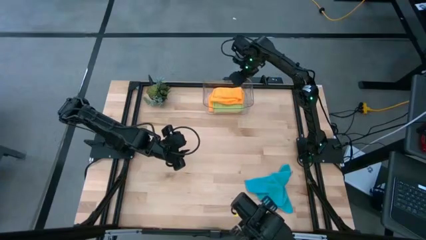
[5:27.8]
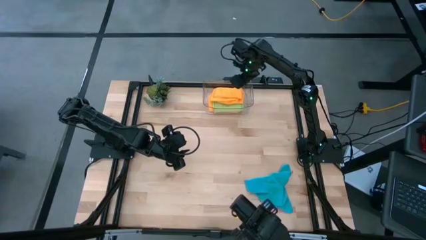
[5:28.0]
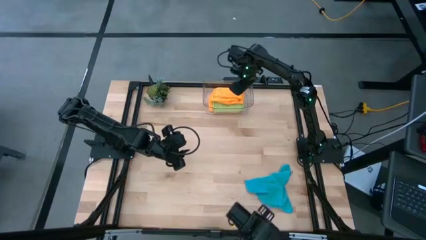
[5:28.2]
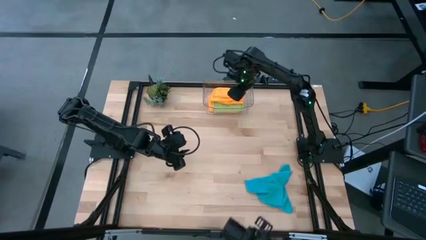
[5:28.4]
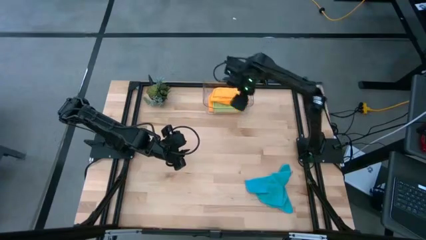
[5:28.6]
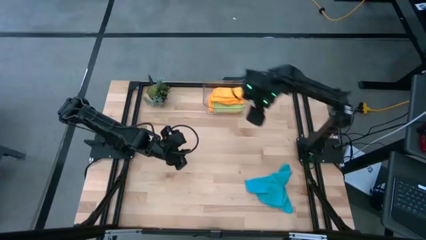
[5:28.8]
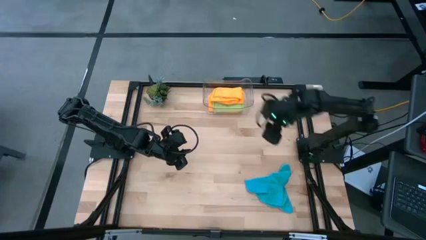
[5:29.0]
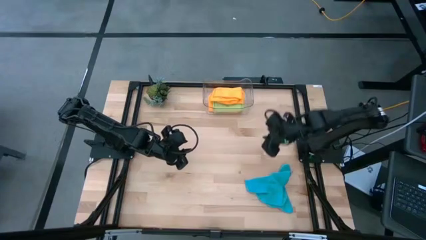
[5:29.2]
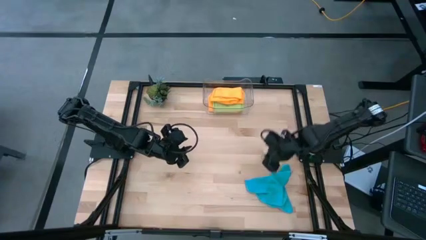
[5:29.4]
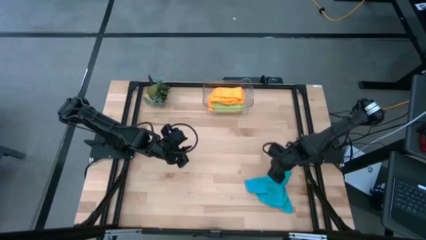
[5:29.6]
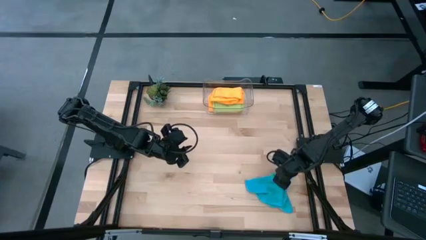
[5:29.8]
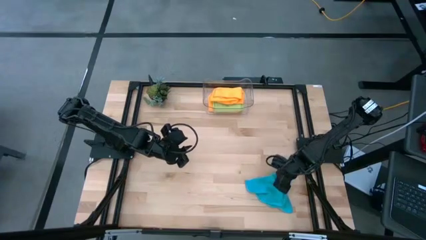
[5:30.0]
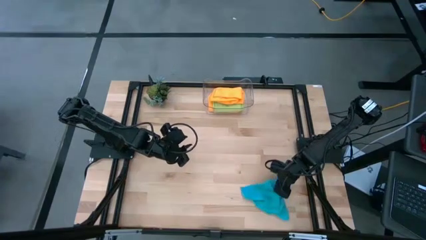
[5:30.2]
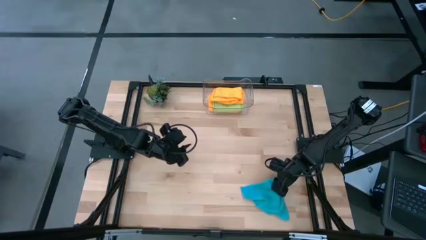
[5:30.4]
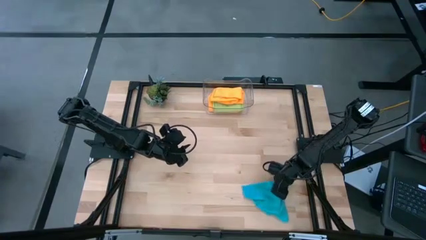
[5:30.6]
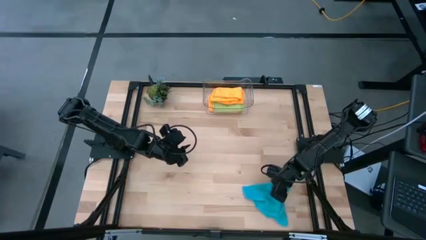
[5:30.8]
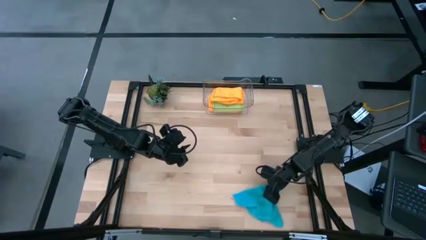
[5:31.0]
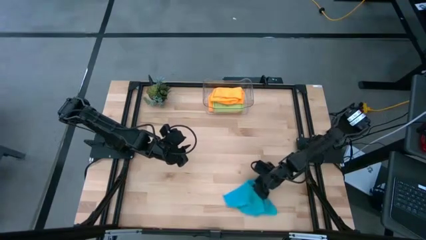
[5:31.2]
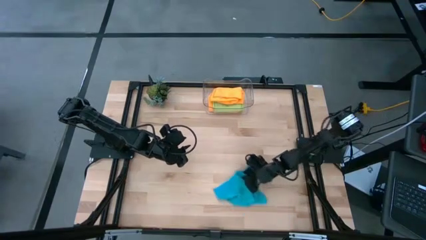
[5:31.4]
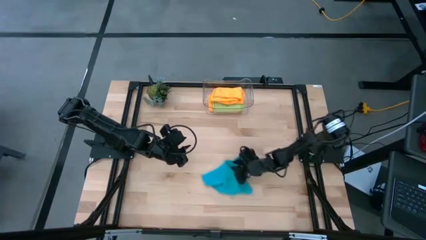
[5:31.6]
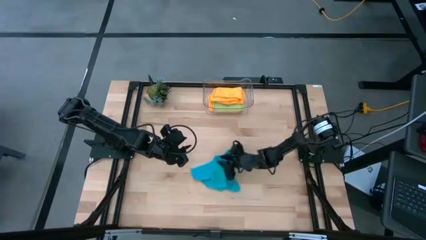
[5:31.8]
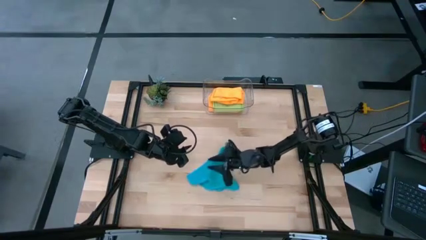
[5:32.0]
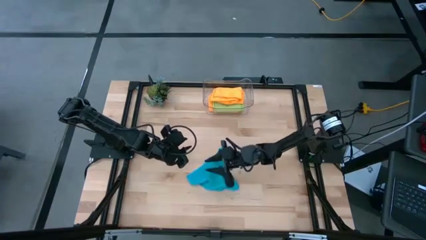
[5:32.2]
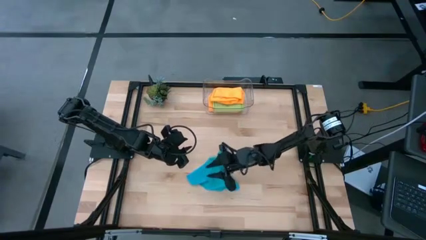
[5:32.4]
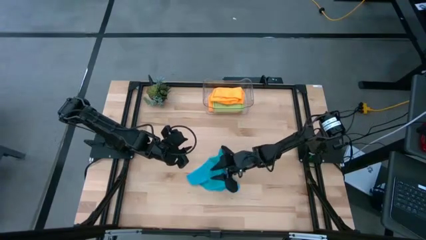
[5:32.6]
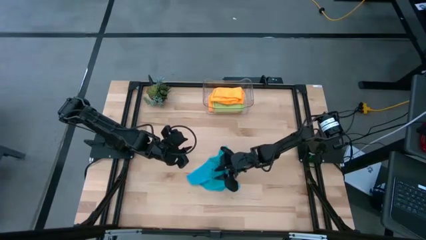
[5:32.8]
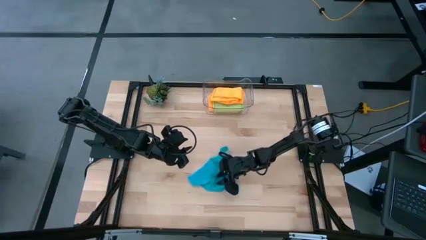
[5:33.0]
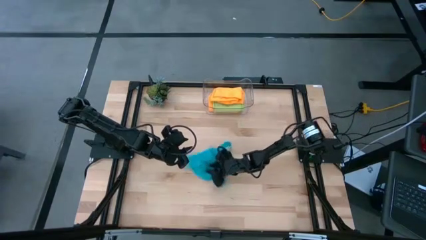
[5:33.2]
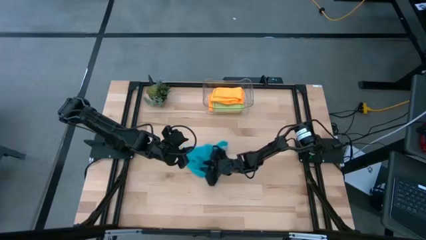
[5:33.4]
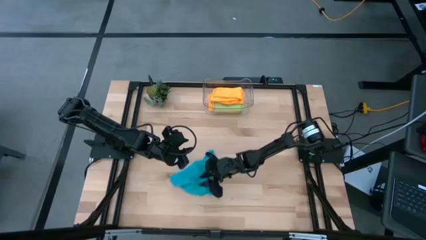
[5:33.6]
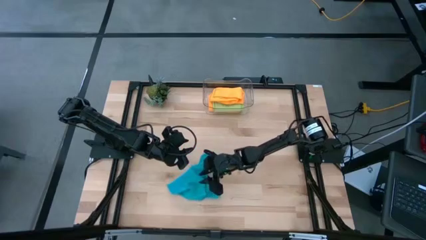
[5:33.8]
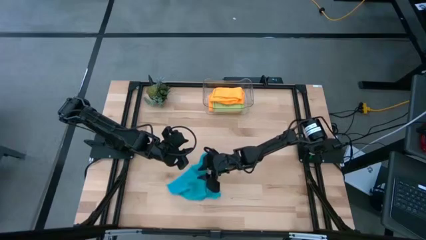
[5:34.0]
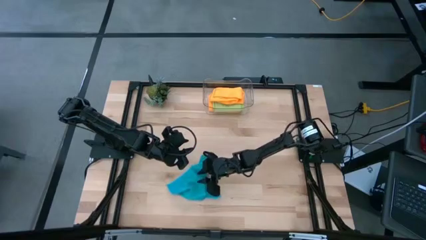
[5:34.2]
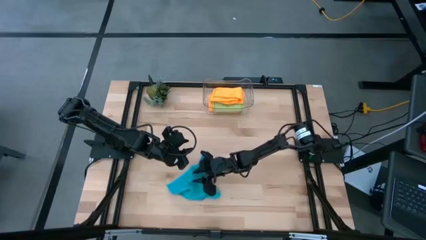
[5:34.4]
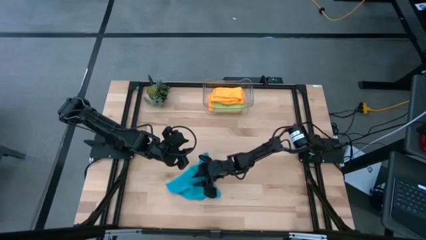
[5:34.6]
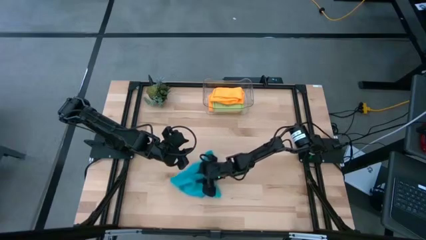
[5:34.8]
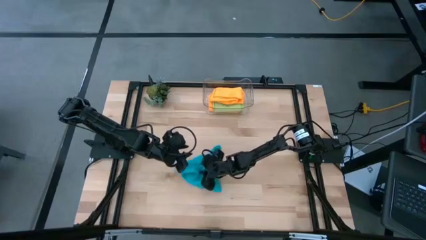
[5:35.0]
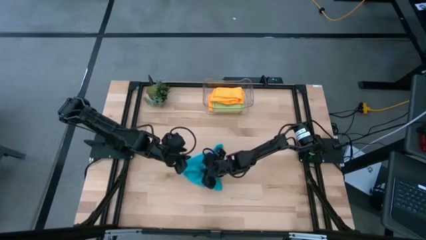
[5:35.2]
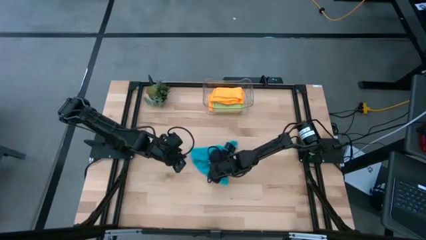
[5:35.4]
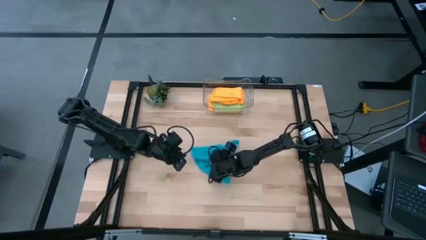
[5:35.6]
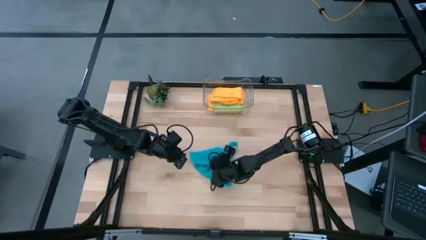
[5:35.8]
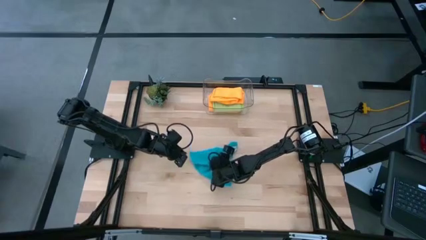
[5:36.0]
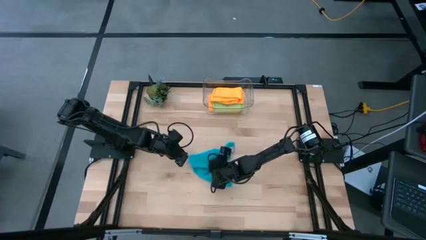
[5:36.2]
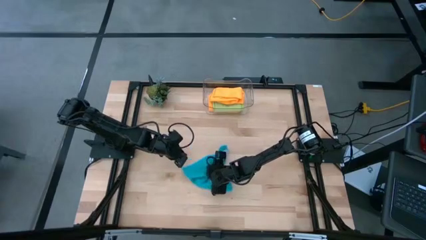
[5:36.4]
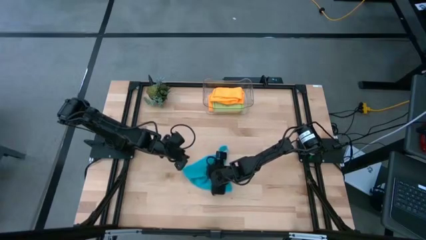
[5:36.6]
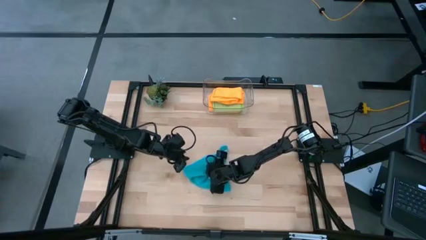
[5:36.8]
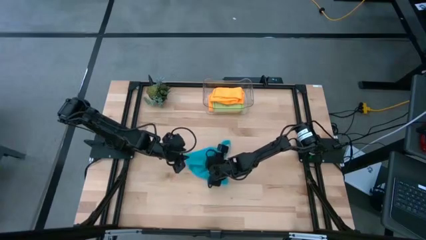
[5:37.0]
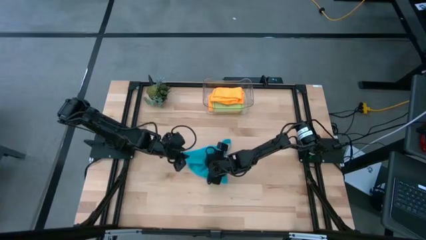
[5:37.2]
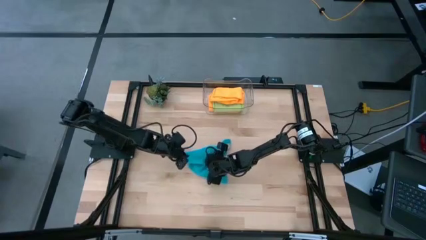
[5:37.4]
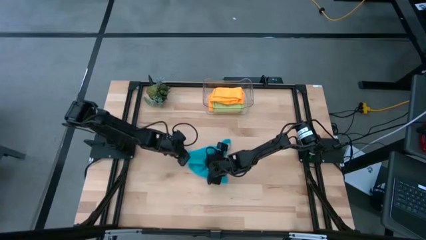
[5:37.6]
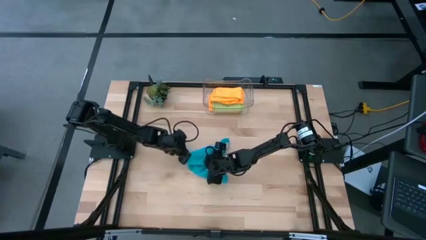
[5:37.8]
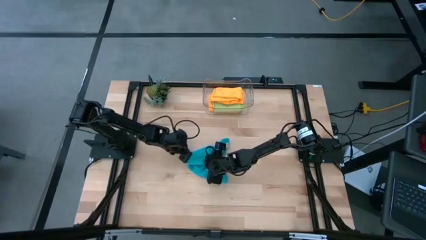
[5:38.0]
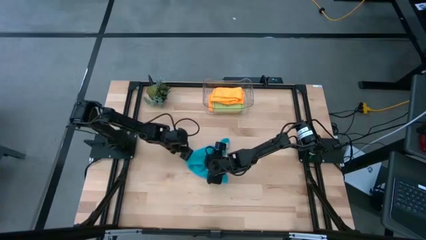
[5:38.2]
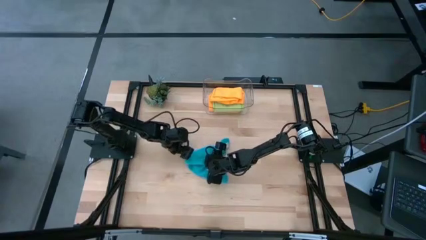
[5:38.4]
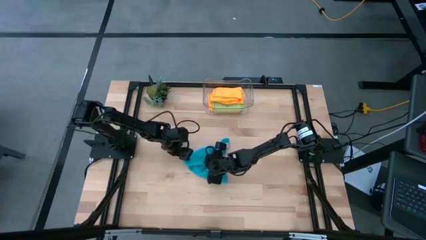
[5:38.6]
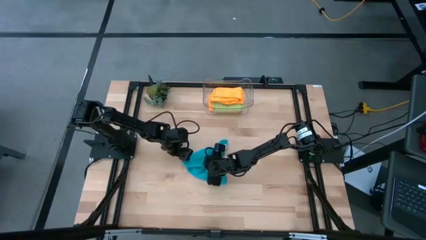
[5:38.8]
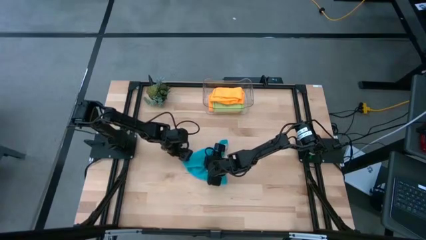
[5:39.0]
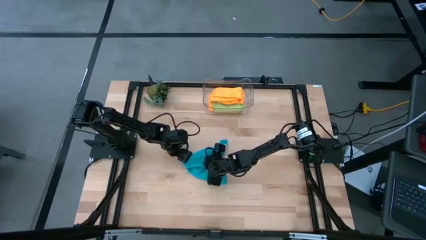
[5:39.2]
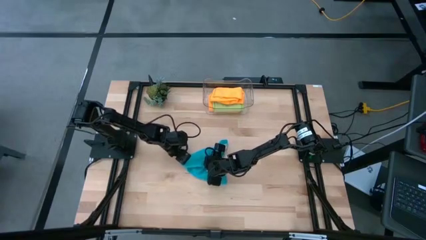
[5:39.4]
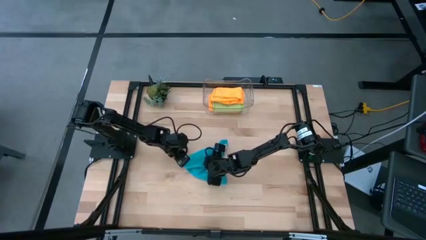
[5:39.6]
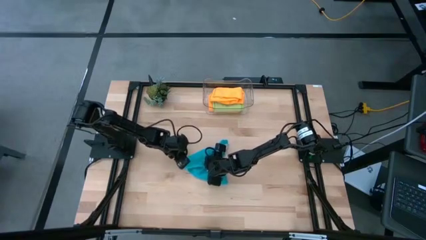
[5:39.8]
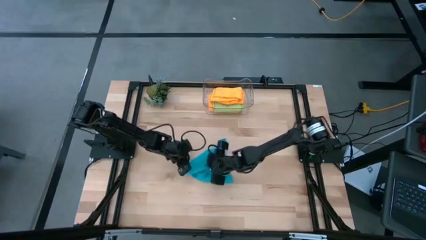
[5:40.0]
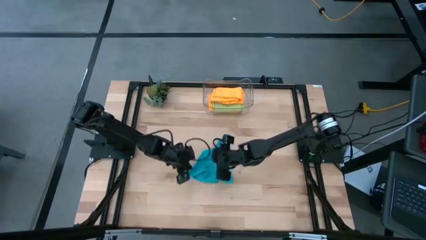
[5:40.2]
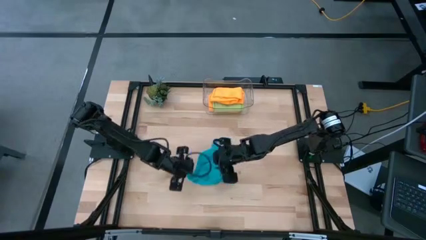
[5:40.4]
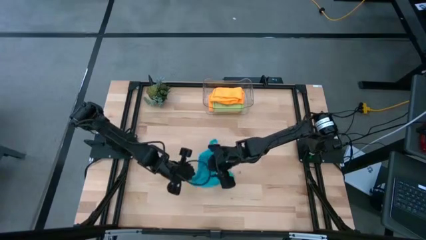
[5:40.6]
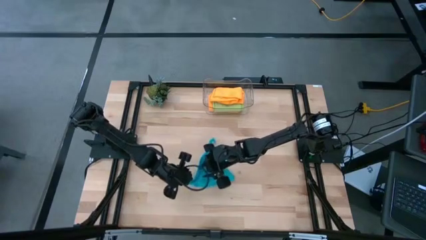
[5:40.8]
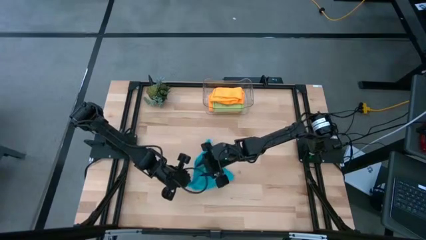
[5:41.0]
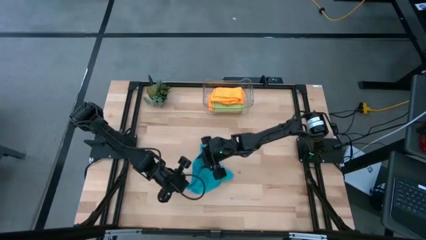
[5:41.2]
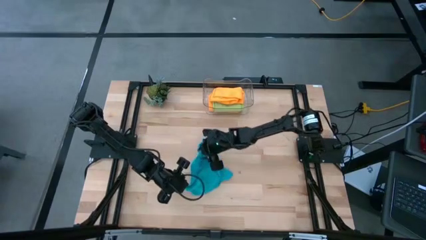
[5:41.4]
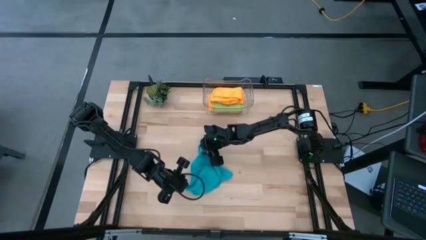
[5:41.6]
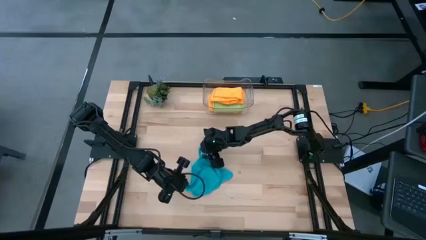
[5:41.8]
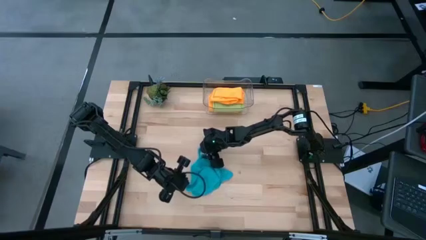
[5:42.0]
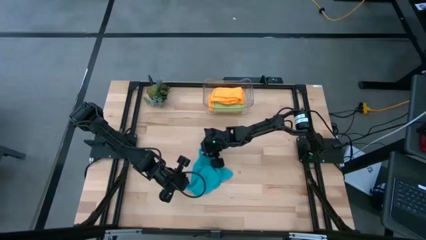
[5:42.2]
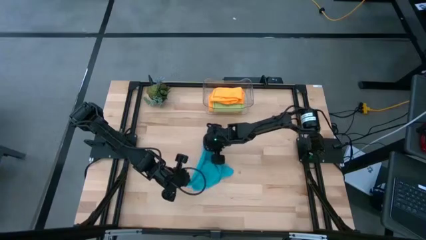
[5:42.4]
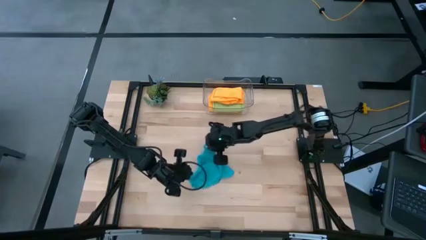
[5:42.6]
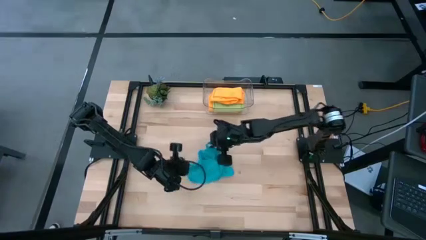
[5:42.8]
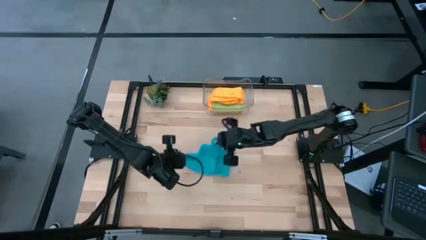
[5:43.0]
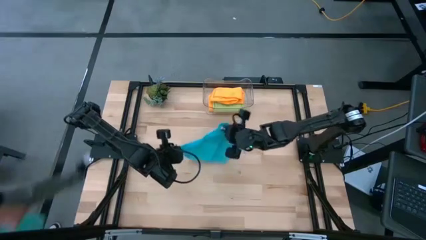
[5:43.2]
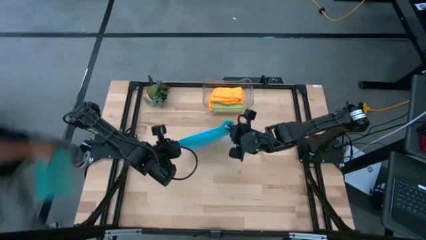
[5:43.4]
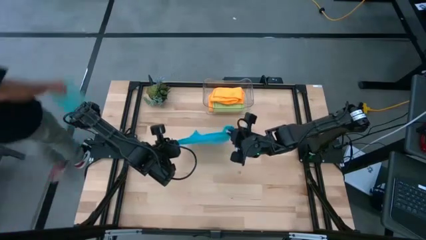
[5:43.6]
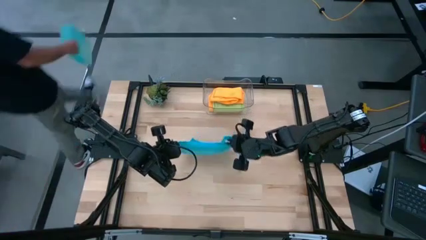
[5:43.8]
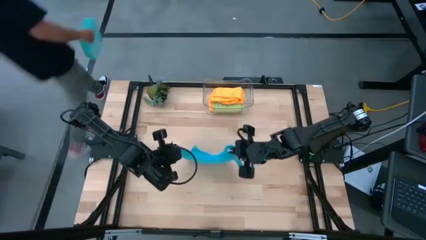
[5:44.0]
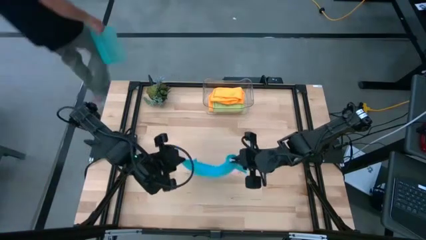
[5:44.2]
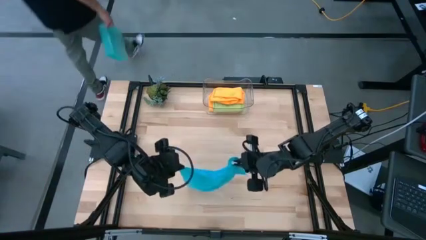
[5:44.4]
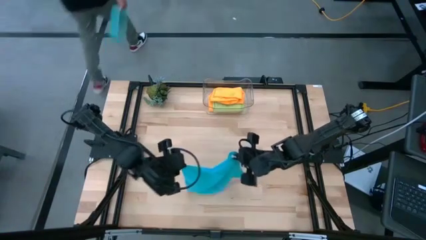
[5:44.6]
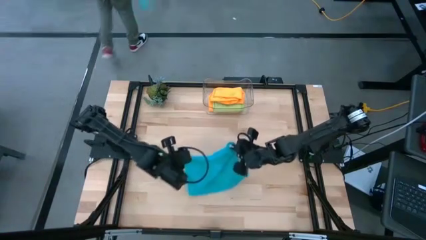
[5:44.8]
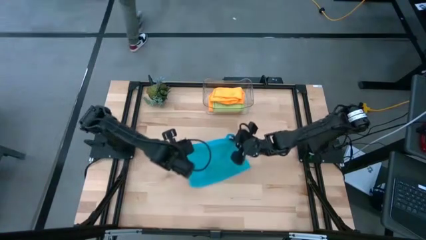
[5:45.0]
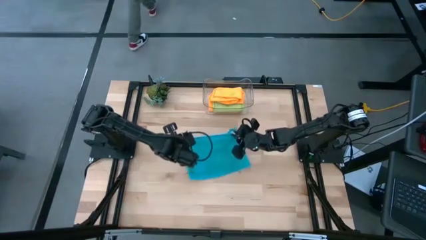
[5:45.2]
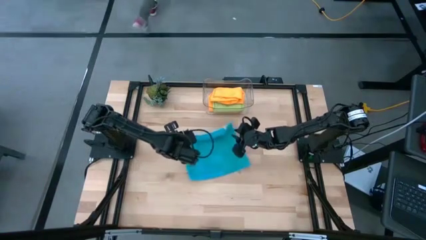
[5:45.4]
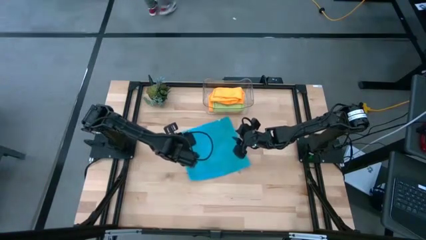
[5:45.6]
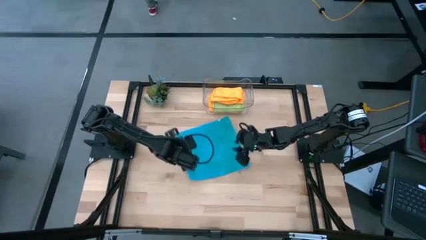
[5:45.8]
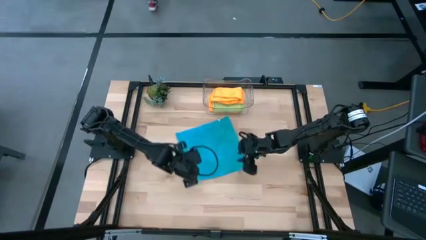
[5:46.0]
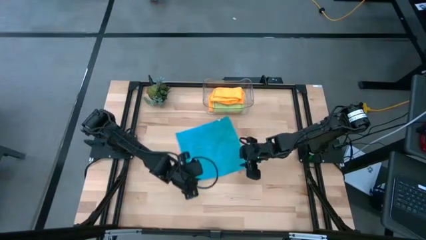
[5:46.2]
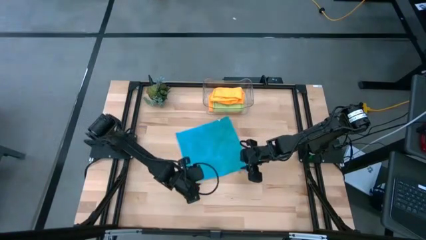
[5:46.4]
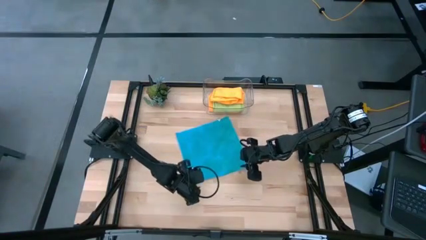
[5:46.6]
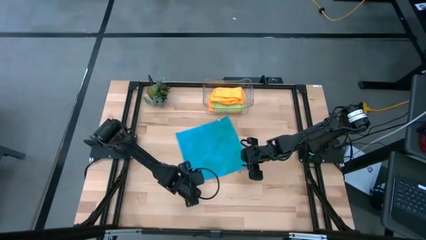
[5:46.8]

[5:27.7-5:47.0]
Task: Fold microfiber towels
Fold the blue microfiber cloth
